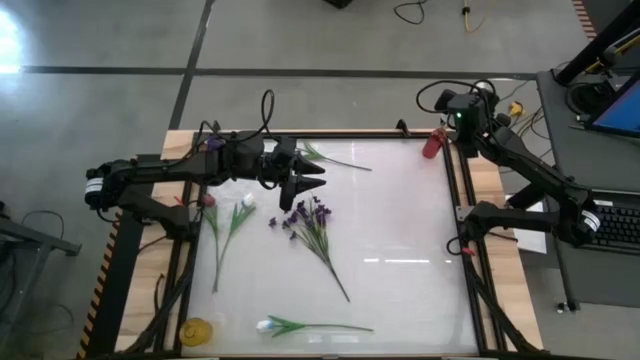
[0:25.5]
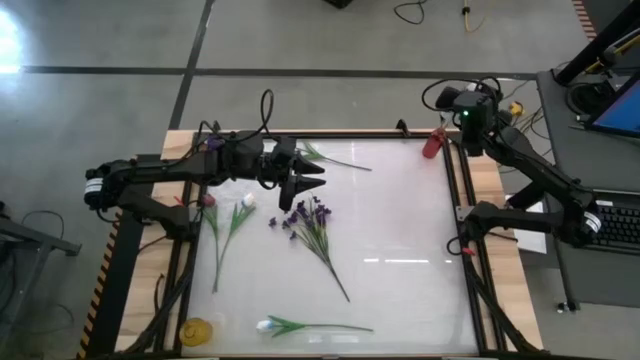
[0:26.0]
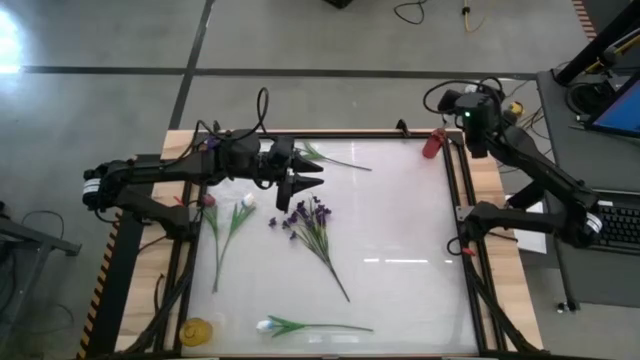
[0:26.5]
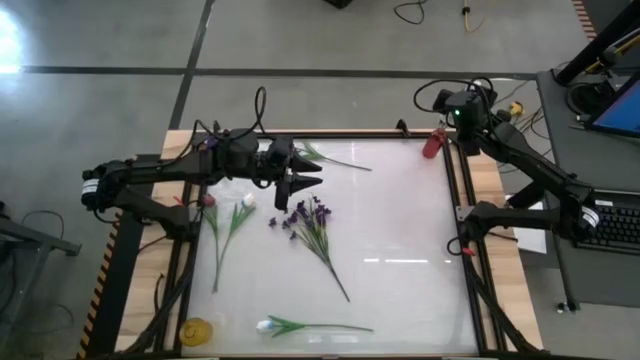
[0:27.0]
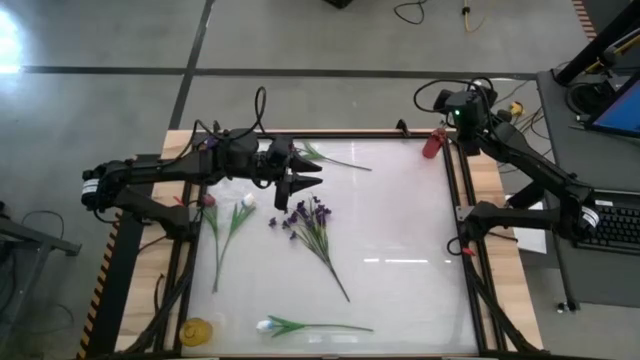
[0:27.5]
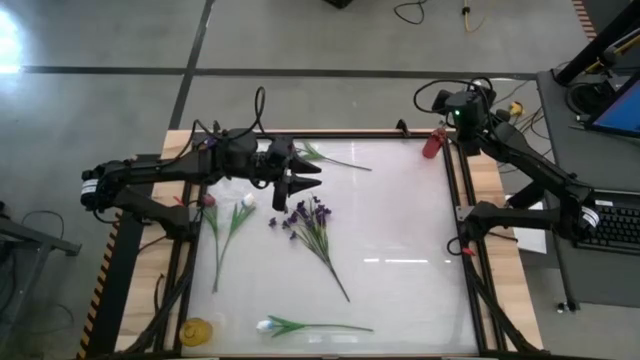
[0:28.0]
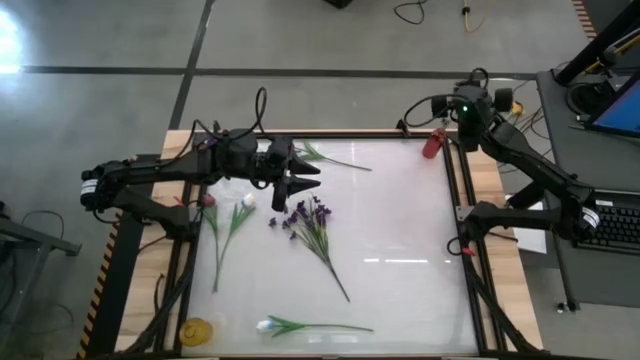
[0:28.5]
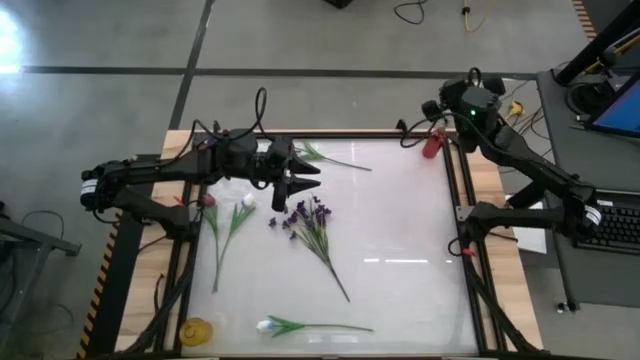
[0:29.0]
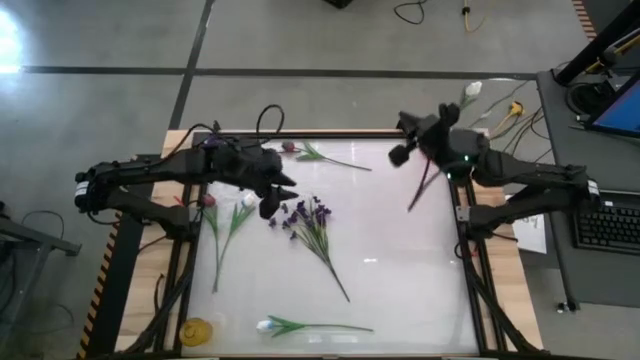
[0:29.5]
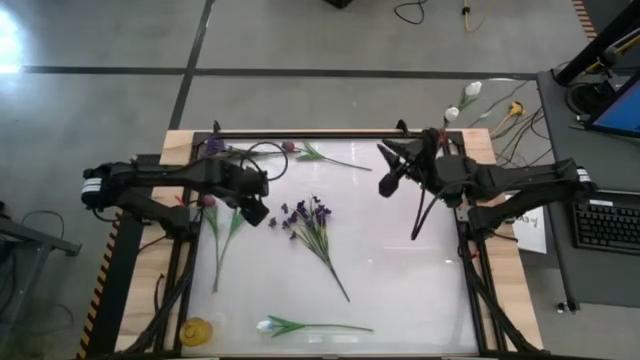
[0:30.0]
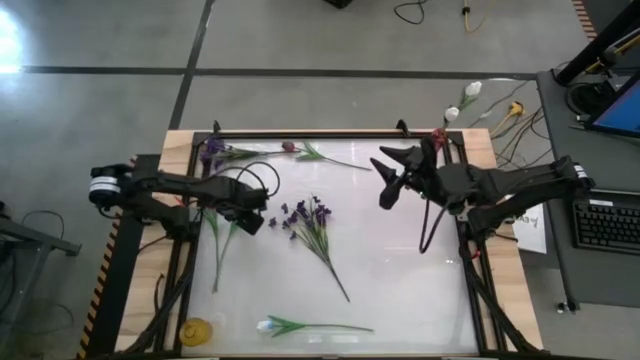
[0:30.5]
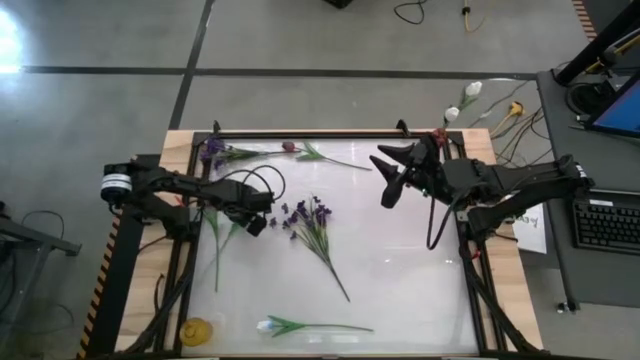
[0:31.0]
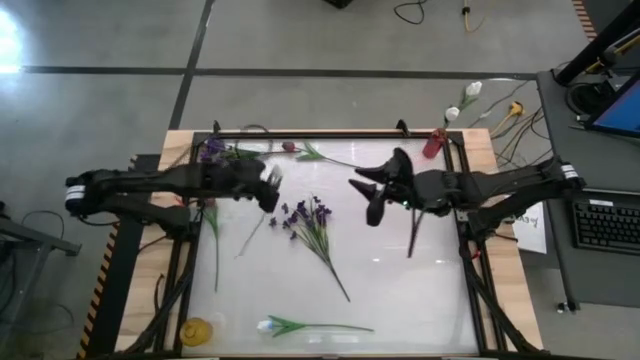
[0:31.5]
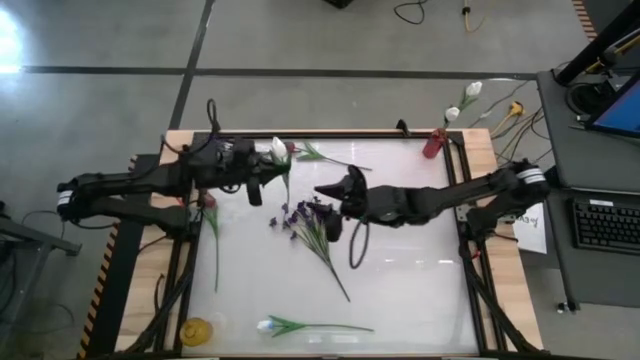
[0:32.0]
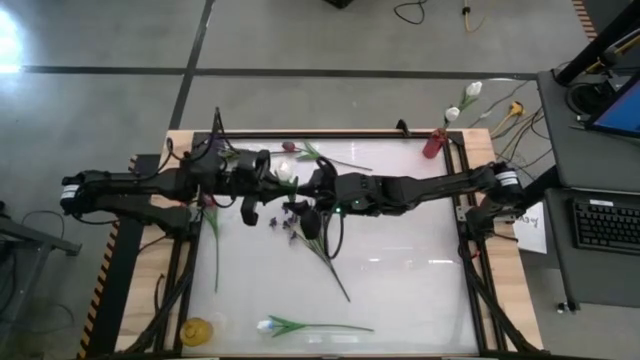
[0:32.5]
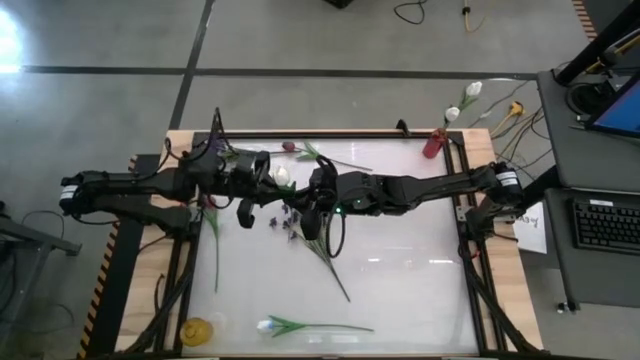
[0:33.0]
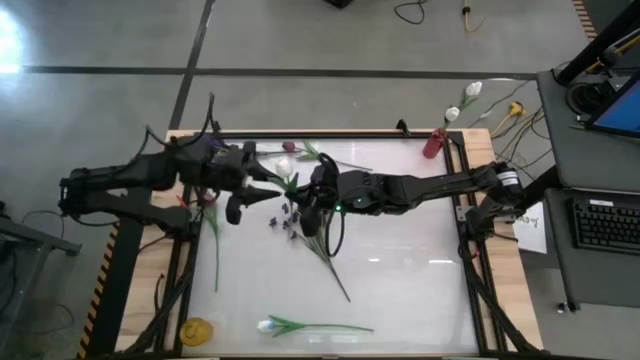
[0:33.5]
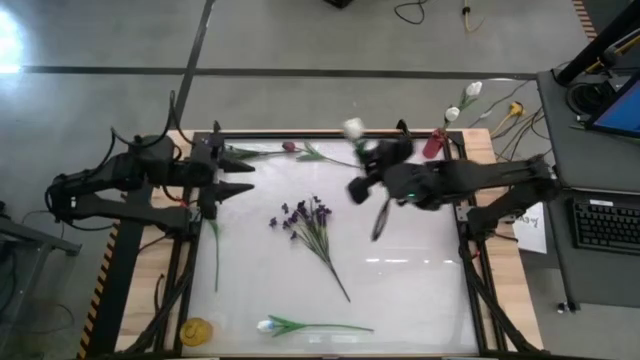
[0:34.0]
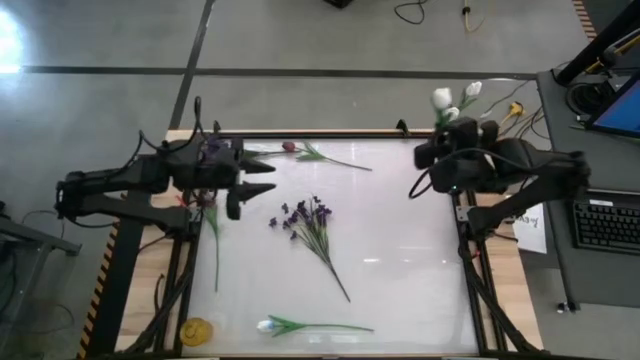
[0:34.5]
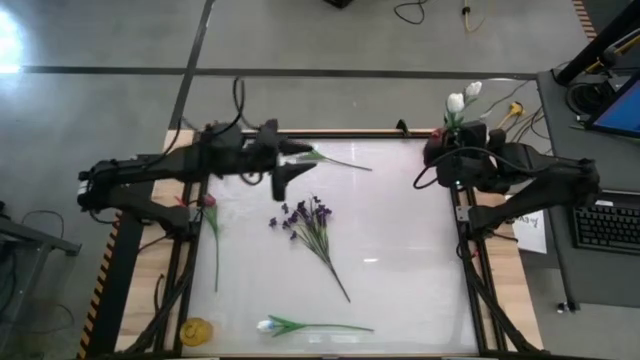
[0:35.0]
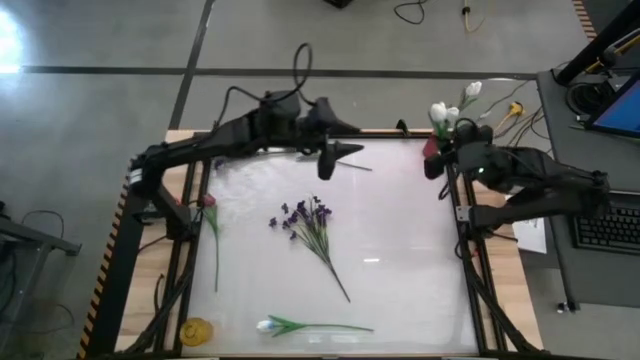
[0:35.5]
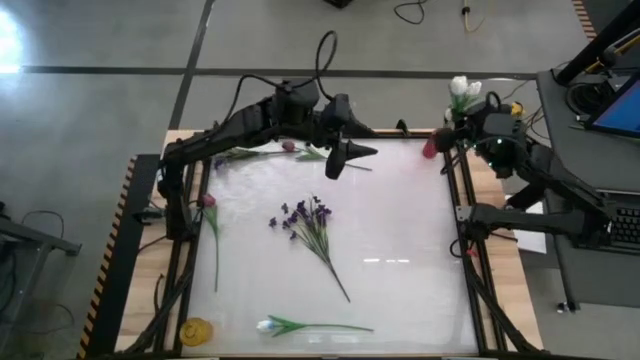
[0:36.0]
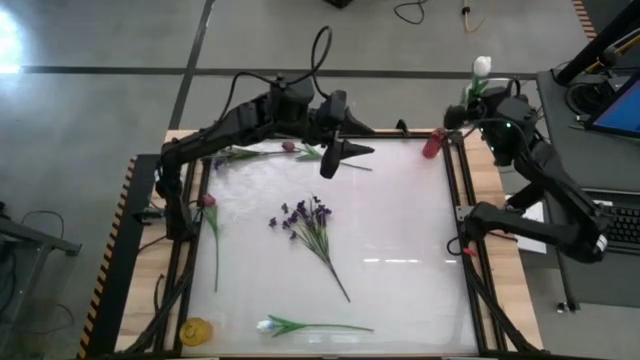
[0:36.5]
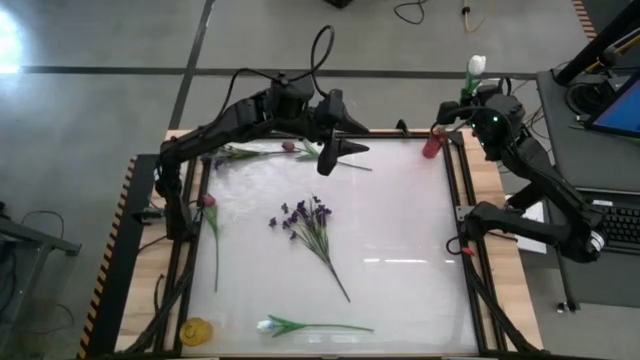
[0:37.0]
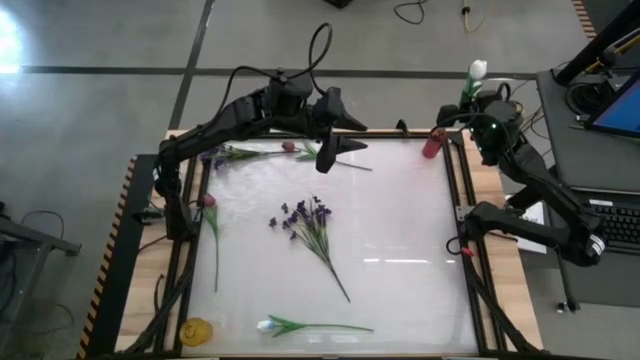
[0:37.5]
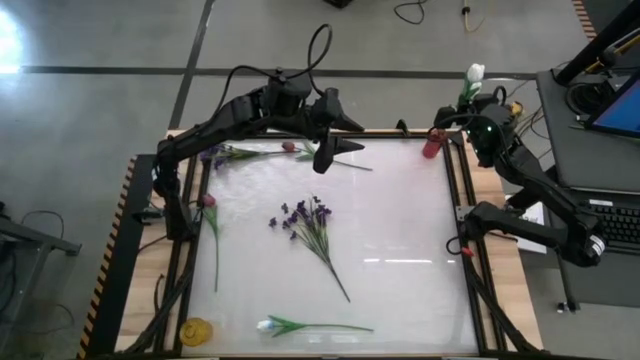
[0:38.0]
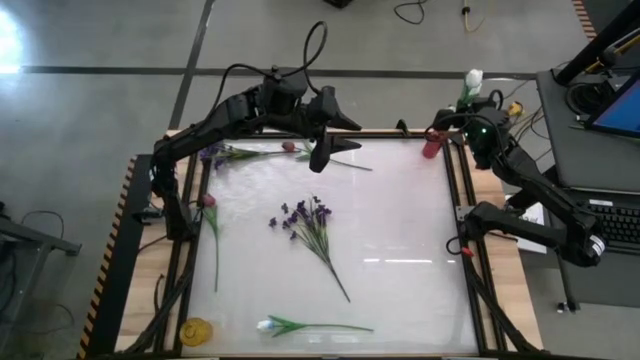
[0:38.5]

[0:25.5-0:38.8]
Task: Sort flowers into vase by color
Put the top white tulip into the red flower vase

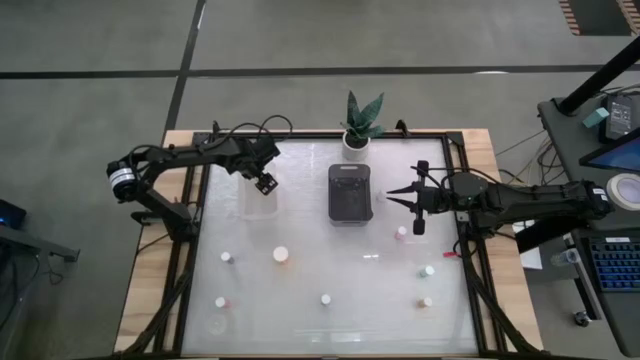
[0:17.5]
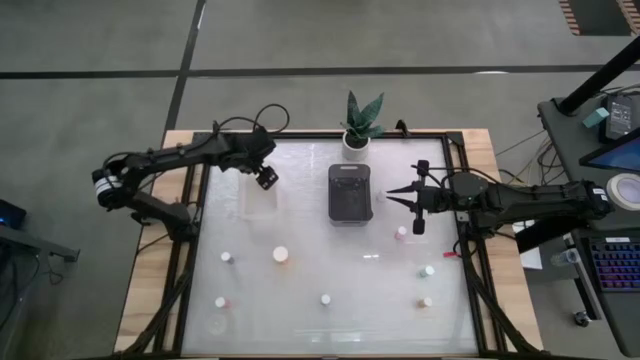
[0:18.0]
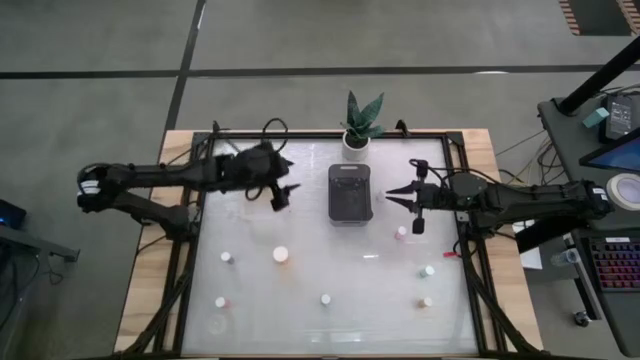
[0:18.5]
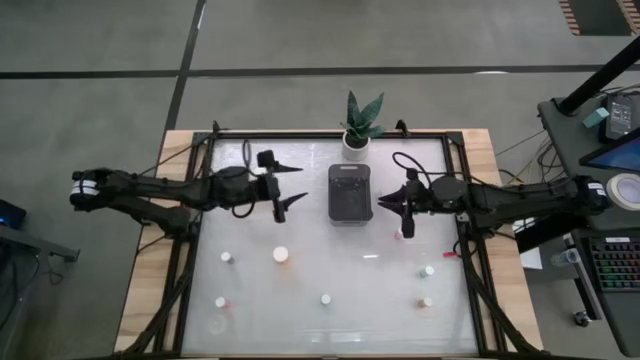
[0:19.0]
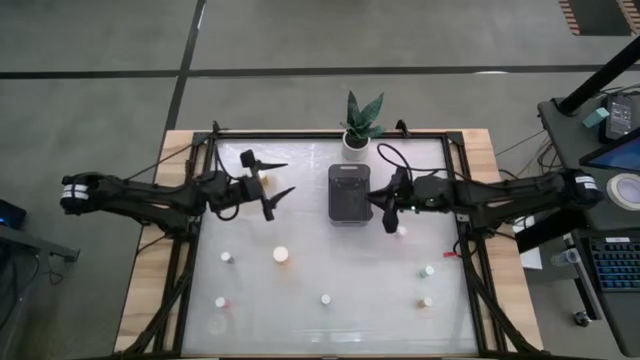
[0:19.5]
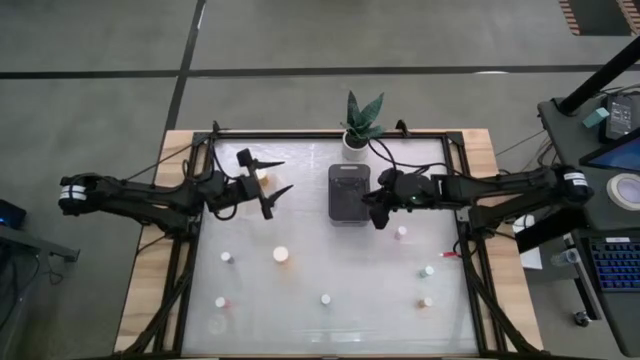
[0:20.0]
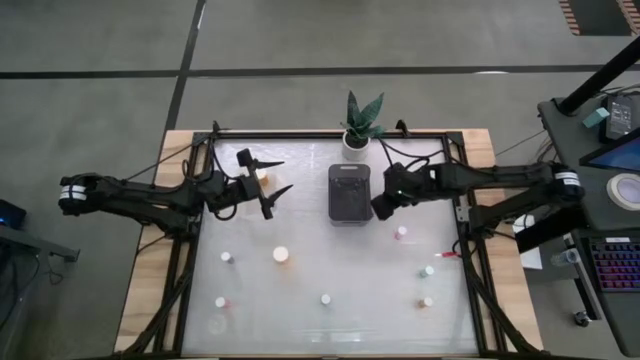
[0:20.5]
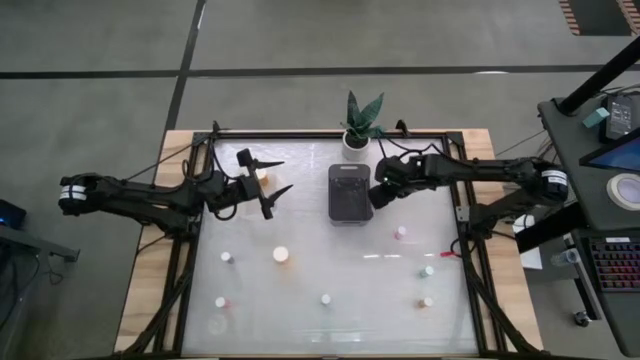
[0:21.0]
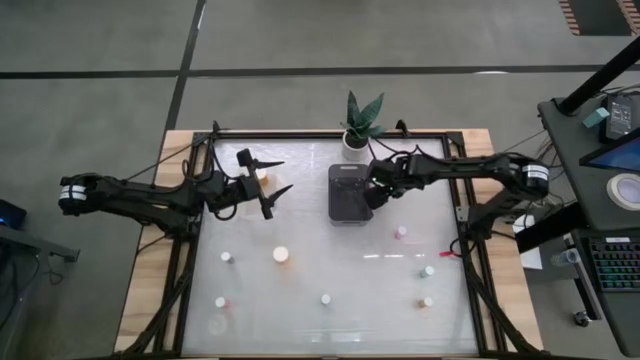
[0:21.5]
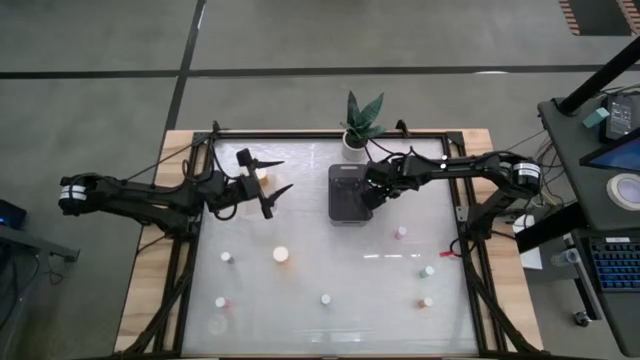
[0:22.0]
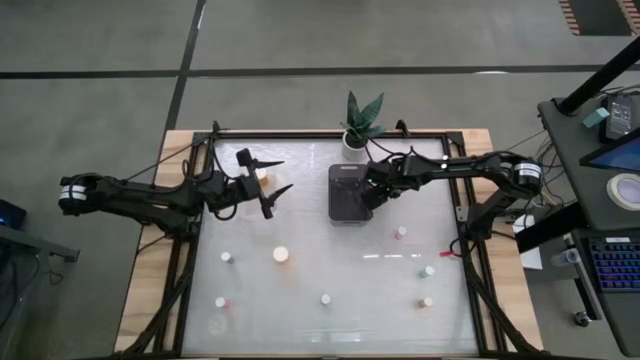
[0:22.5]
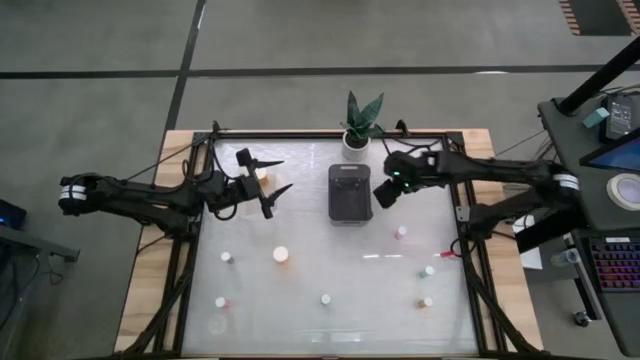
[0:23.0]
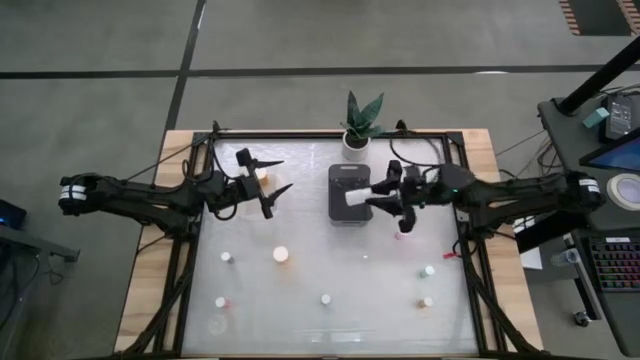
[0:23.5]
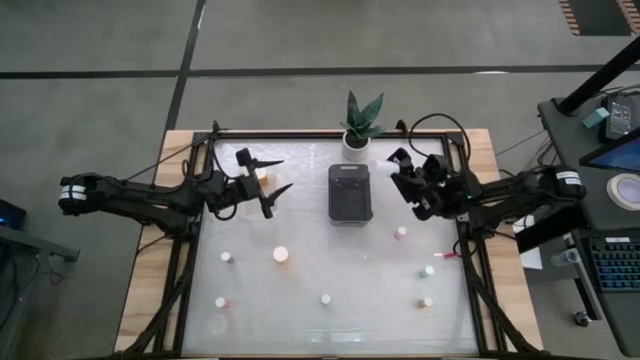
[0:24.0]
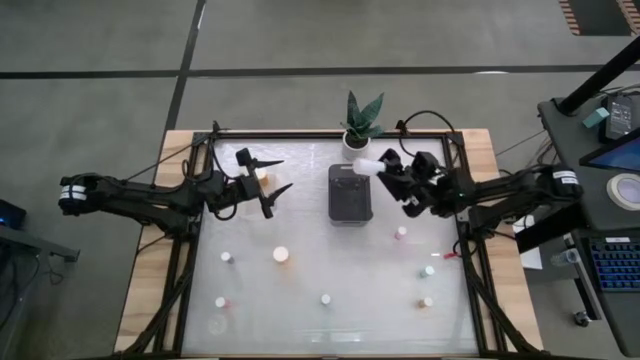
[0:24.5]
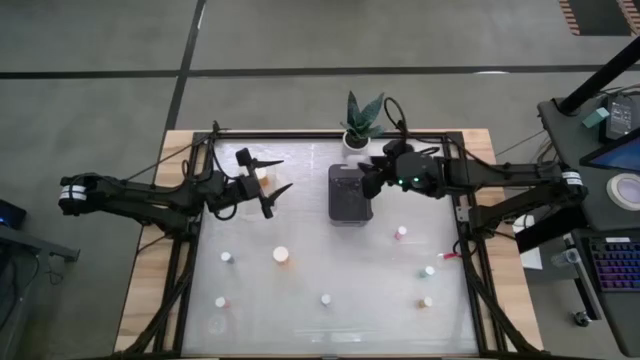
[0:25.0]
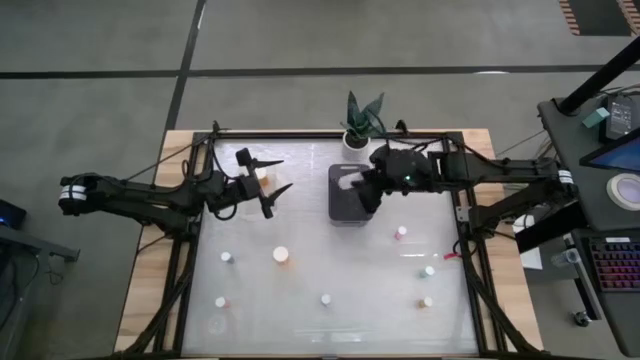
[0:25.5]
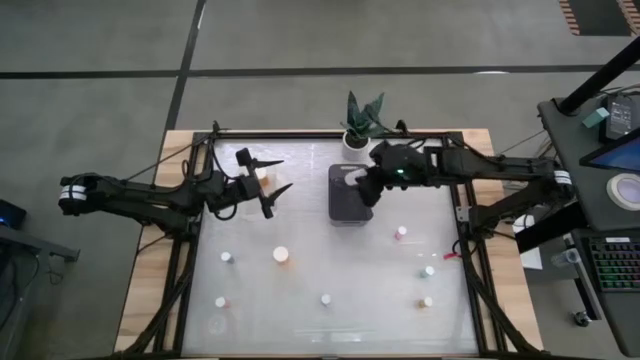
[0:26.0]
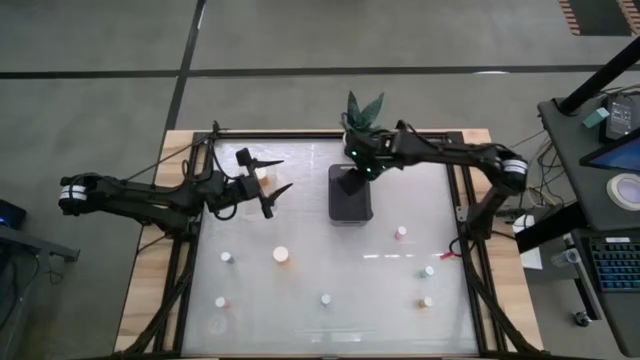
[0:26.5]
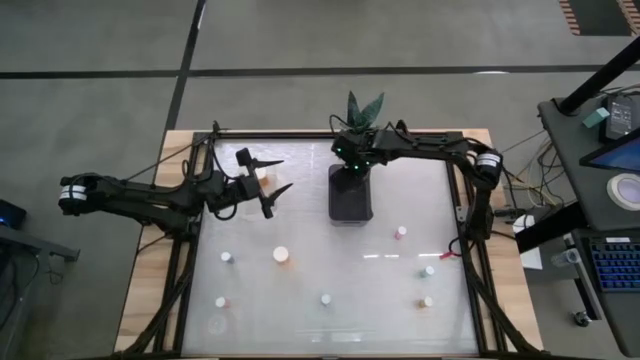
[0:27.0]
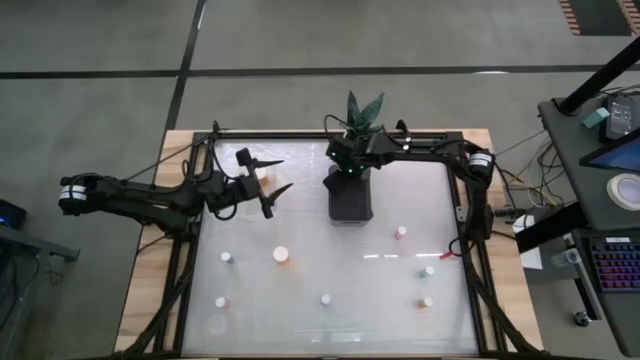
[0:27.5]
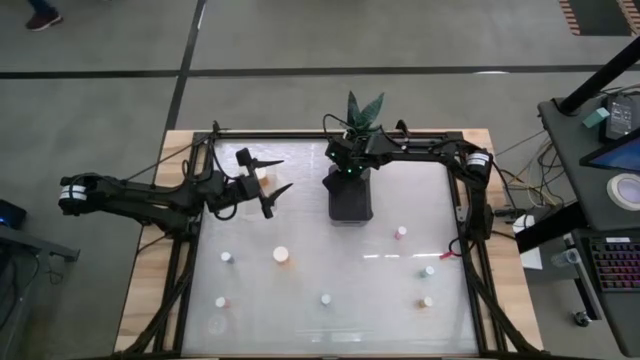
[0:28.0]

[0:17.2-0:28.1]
Task: Pick and place medicine bottles into bin by pill shape (circle, oval)
Put the top right transparent pill bottle into the black bin
